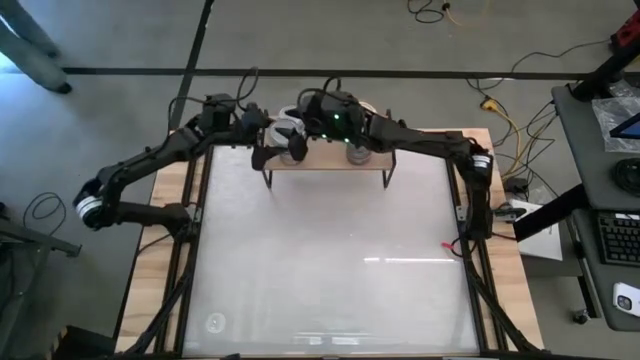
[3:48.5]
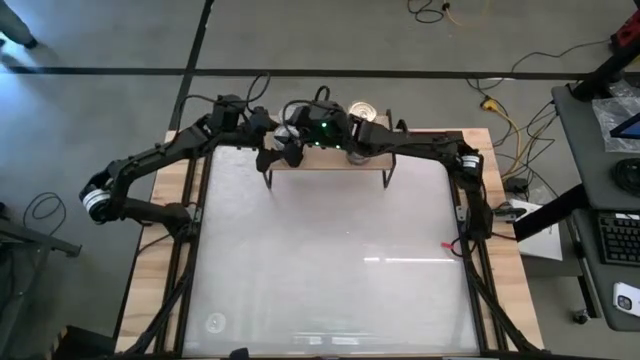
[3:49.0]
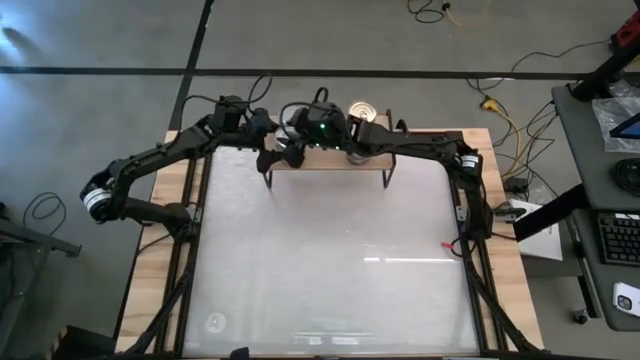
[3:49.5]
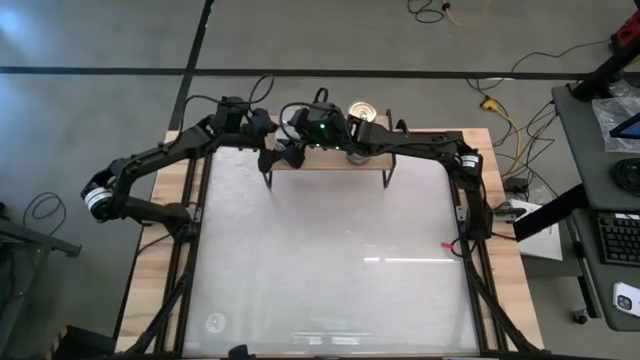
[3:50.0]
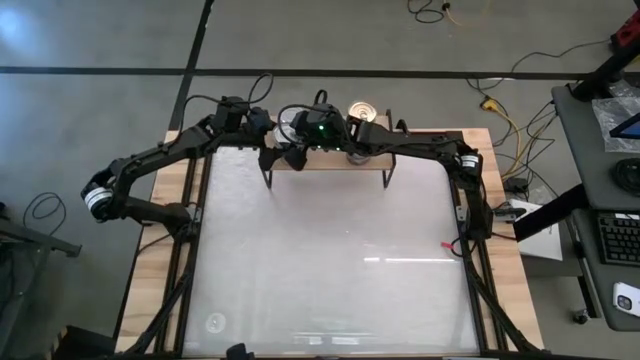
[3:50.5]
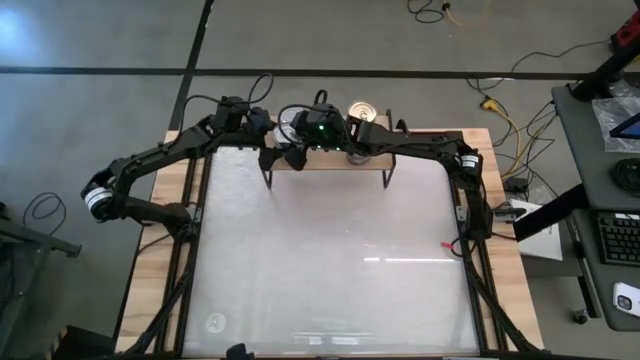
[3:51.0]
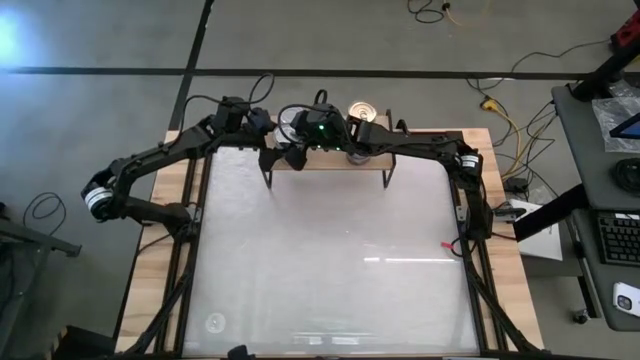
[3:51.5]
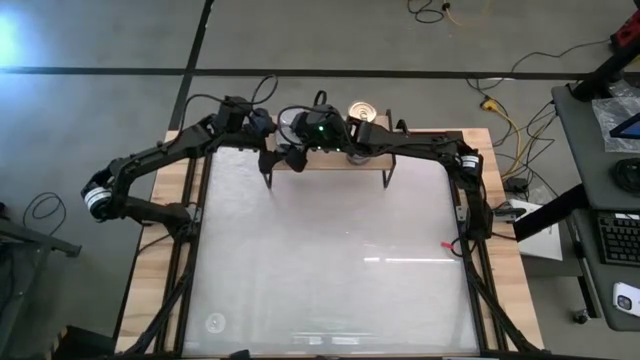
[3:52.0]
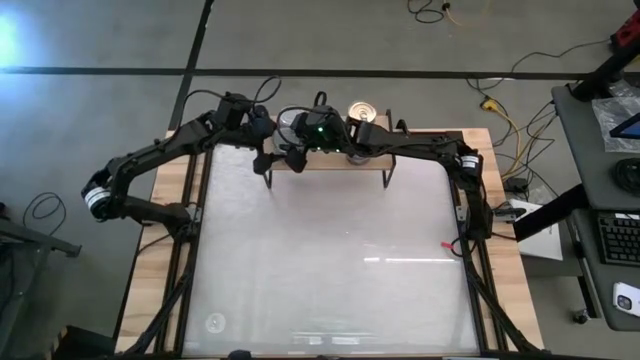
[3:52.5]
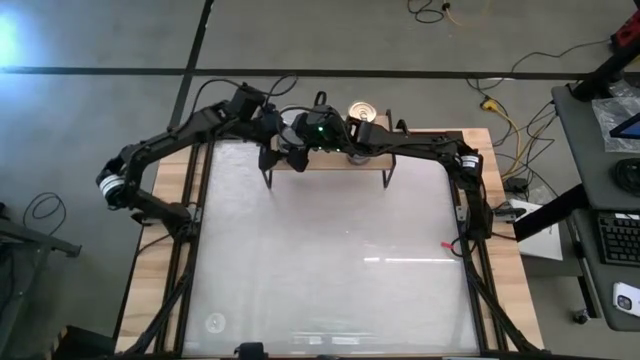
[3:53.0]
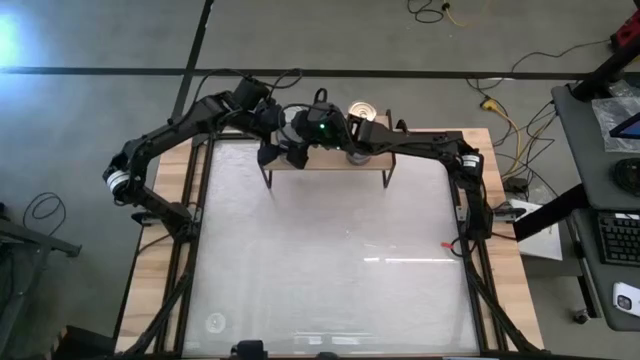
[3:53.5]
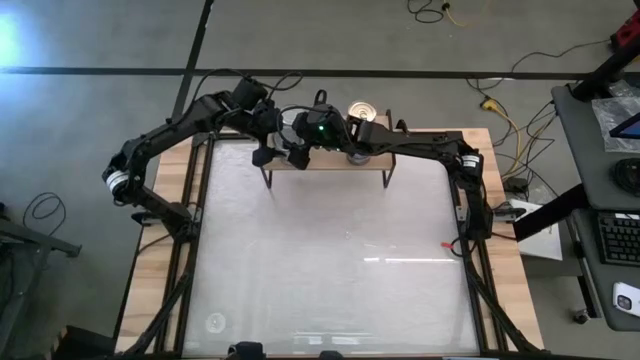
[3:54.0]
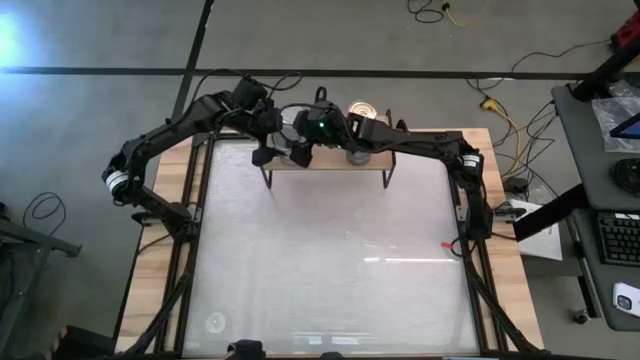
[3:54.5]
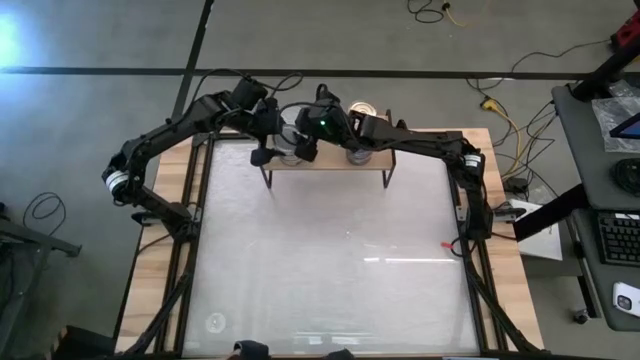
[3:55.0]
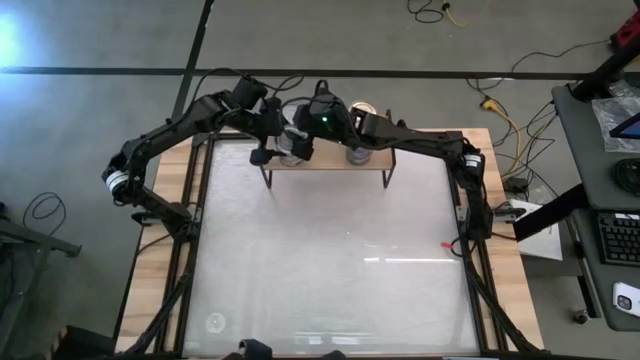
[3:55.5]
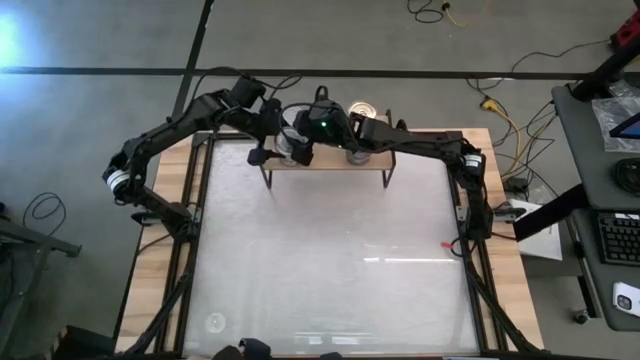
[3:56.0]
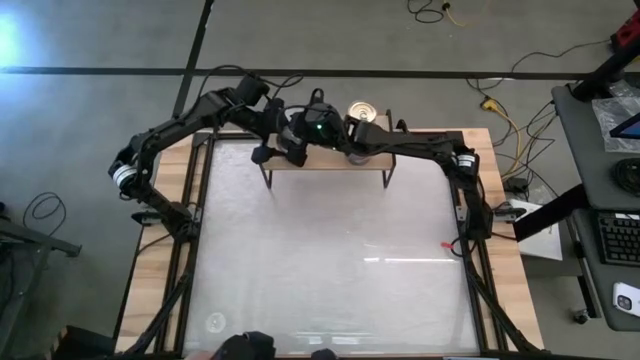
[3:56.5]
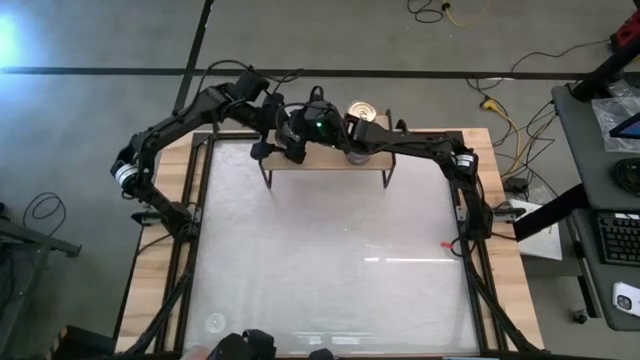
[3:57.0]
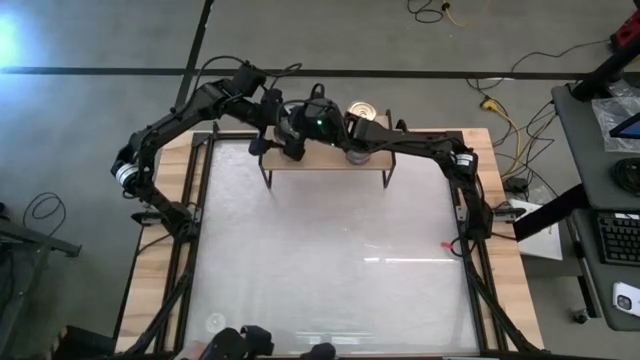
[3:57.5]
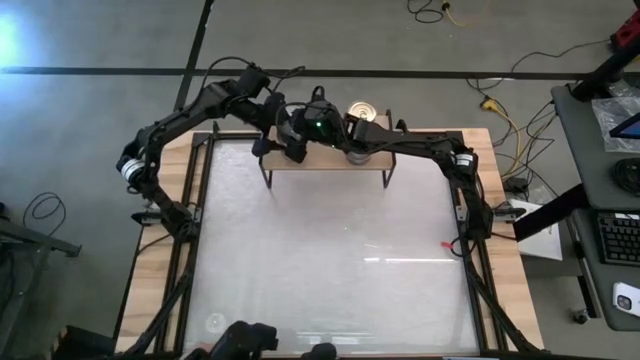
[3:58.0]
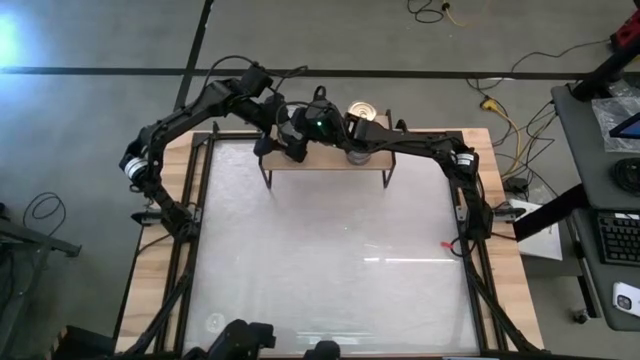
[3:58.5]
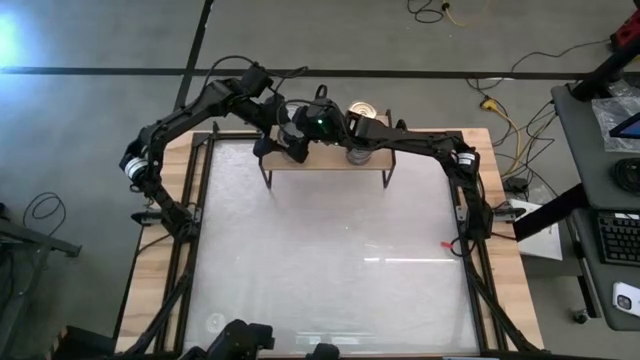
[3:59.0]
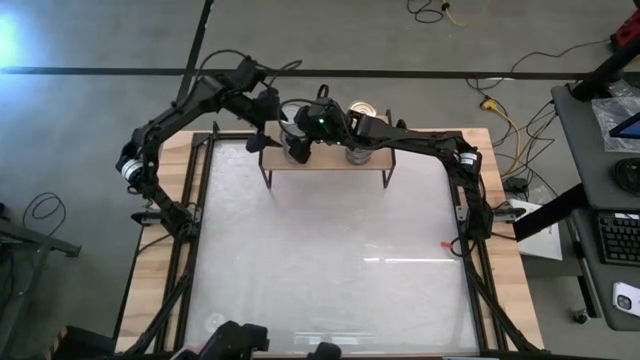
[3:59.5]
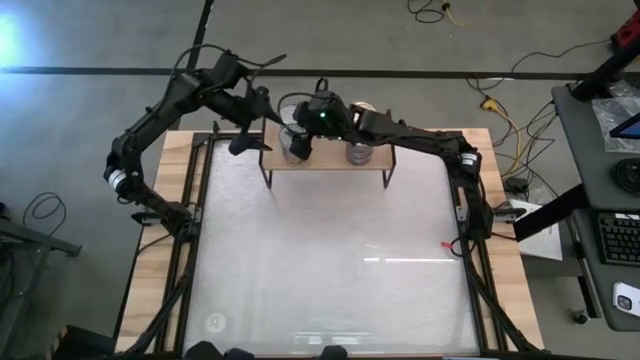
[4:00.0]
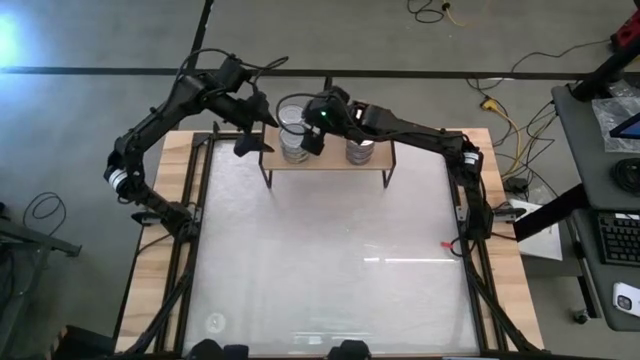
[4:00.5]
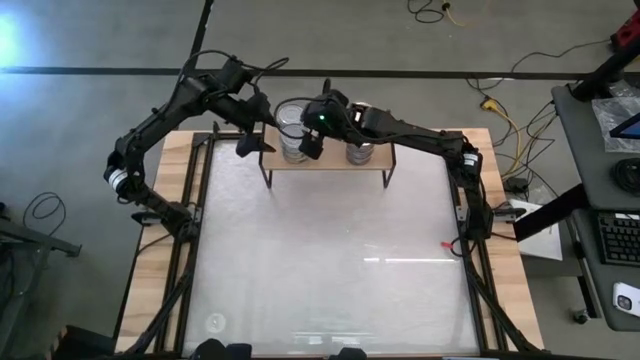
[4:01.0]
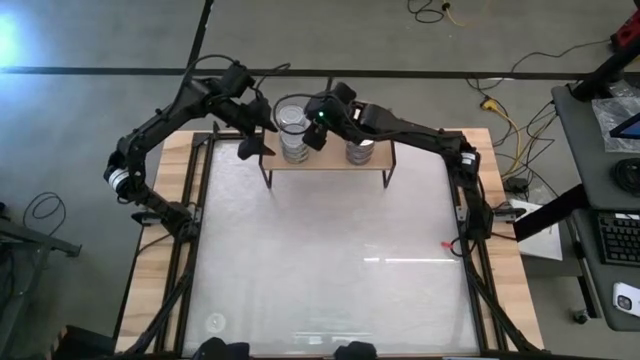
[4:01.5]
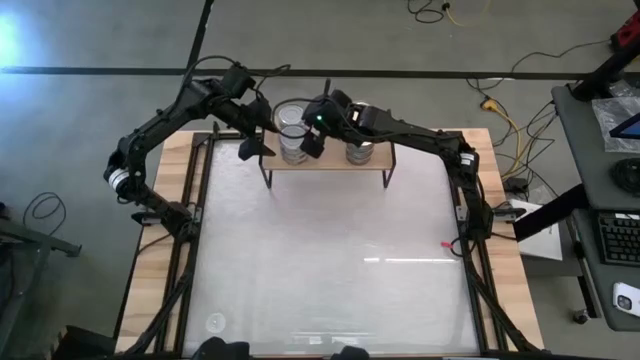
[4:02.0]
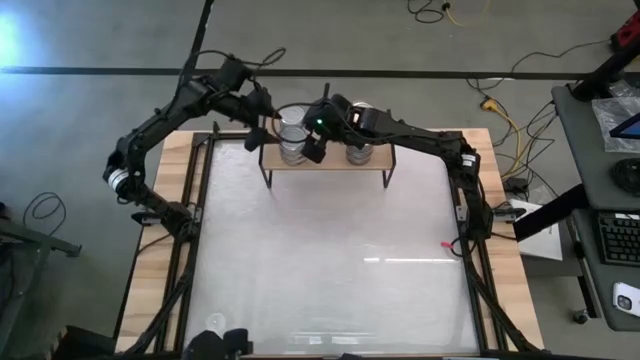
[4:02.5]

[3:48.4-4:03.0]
Task: Stack canned seafood by type on shelf
Stack the green tuna can on top of the green tuna can on the shelf

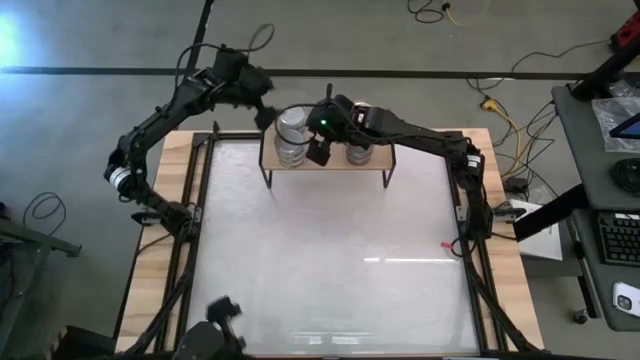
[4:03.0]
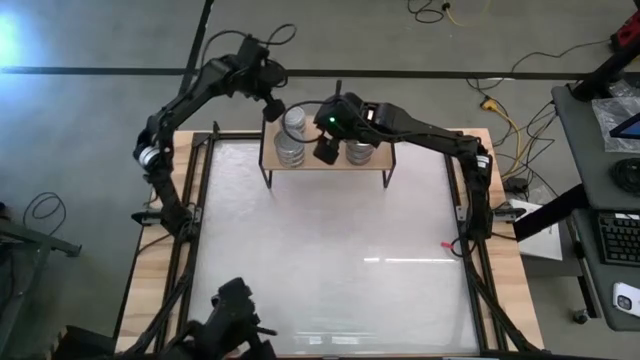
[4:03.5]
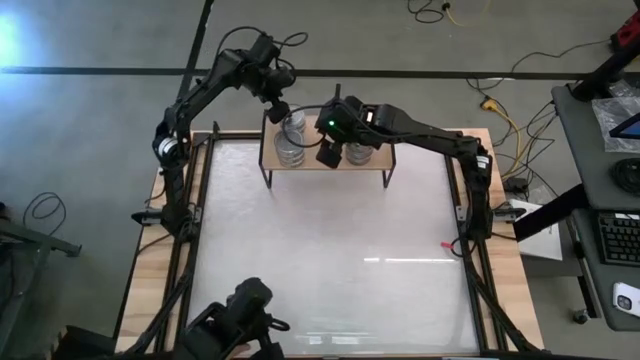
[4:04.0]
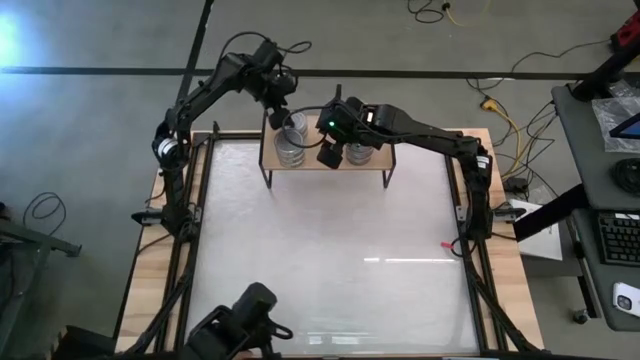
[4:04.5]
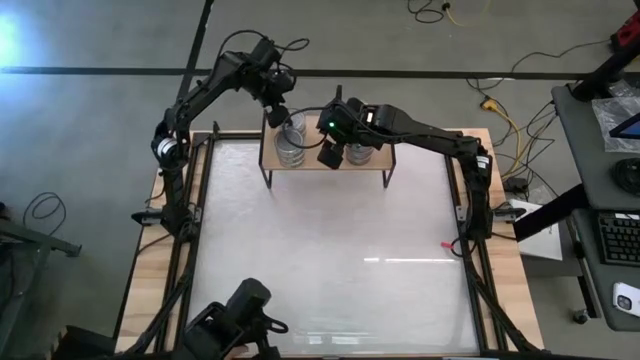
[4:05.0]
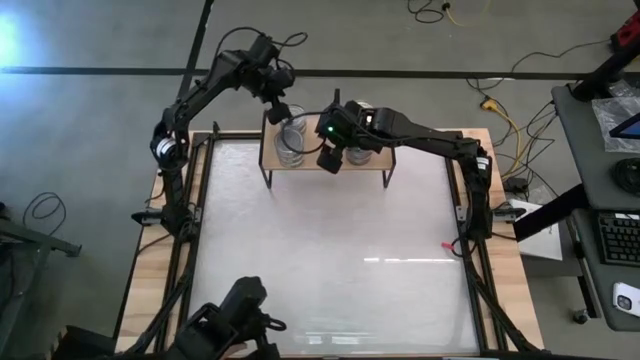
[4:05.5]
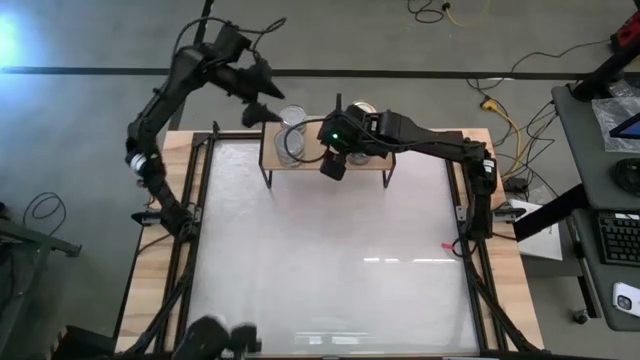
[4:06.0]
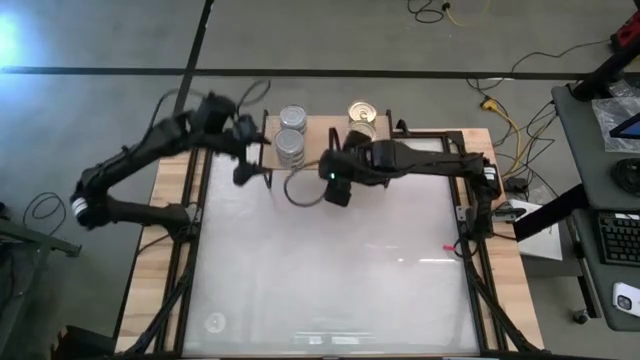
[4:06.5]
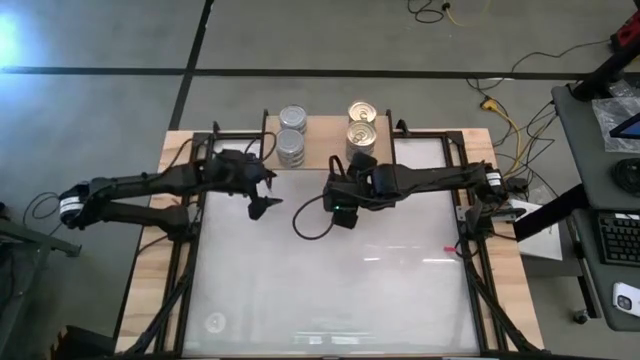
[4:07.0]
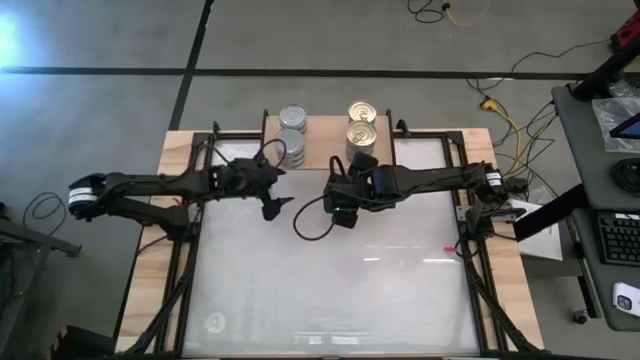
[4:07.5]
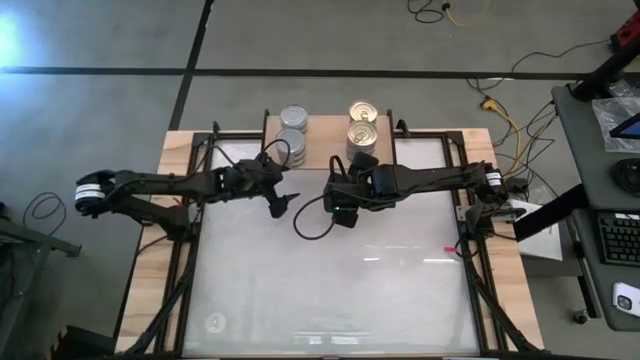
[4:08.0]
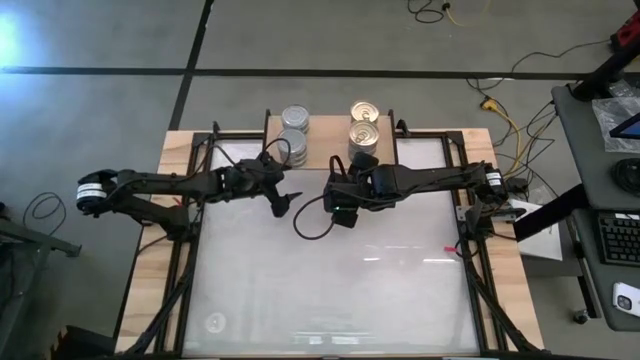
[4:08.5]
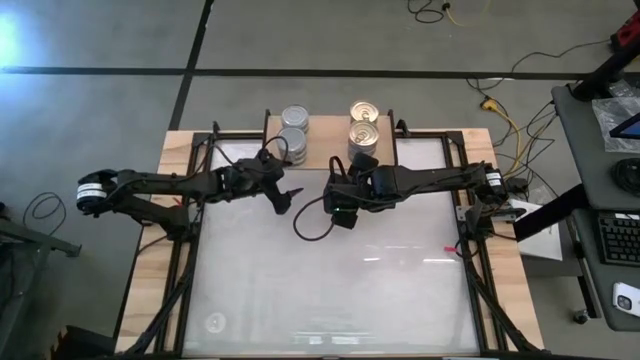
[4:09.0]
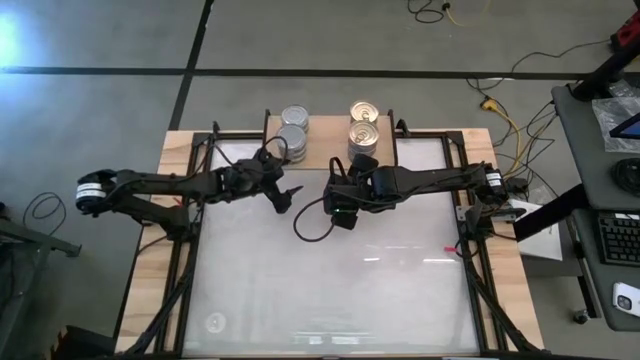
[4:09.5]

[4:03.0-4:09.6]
Adjust the green tuna cans on the shelf
